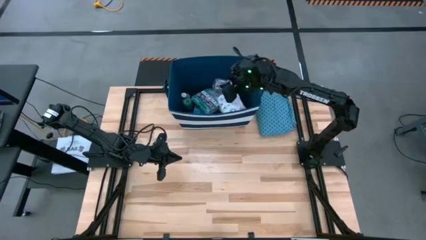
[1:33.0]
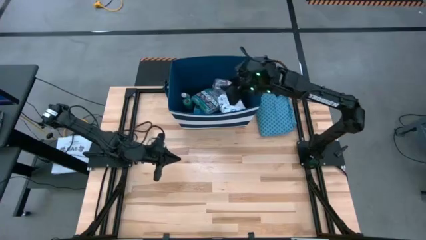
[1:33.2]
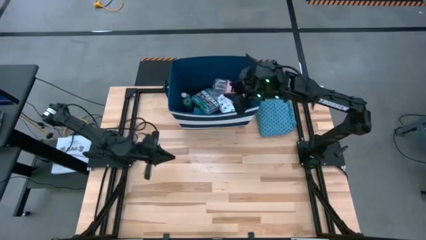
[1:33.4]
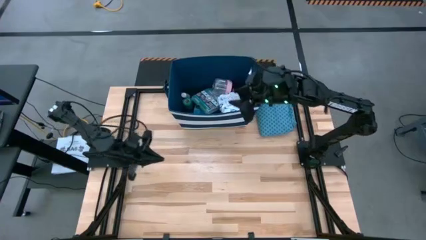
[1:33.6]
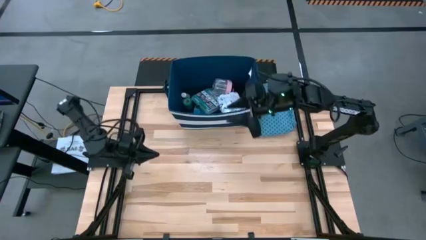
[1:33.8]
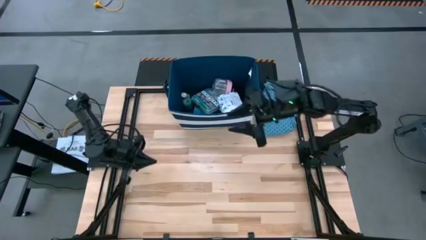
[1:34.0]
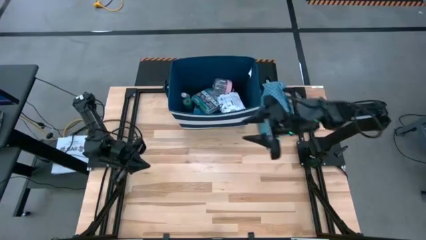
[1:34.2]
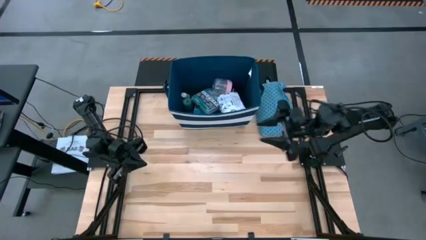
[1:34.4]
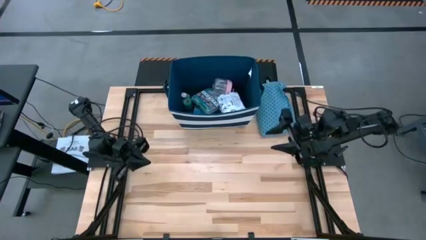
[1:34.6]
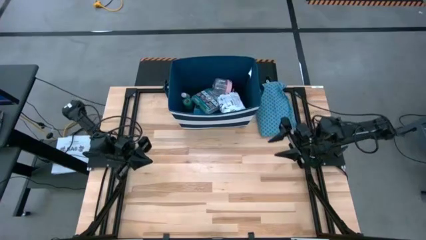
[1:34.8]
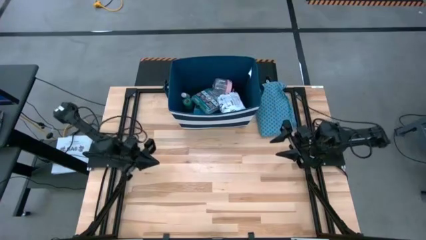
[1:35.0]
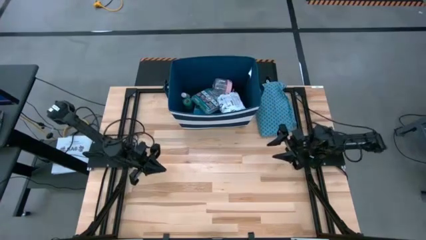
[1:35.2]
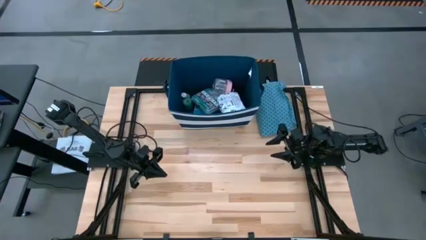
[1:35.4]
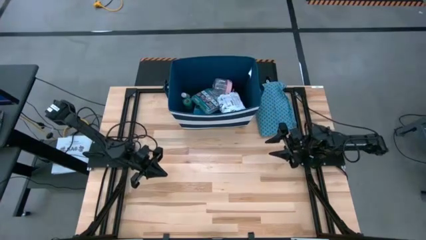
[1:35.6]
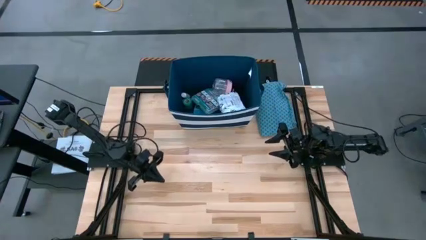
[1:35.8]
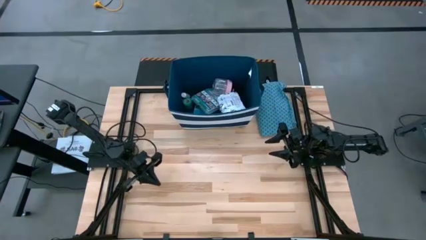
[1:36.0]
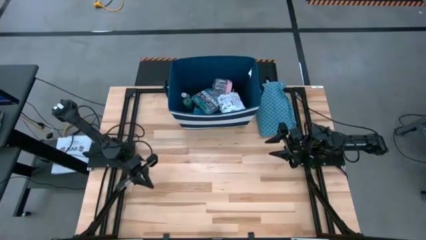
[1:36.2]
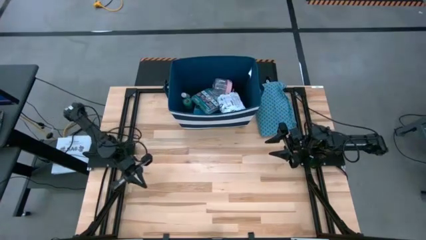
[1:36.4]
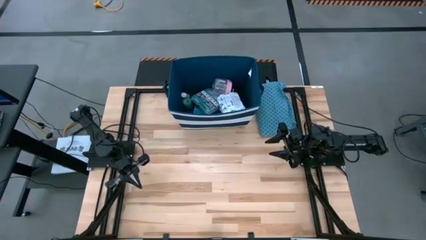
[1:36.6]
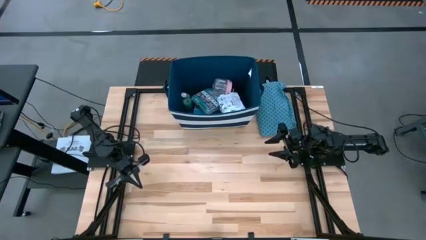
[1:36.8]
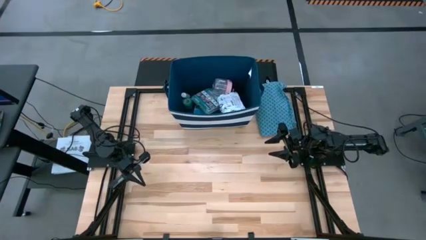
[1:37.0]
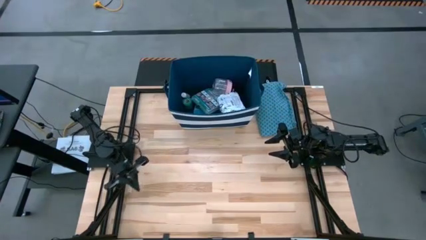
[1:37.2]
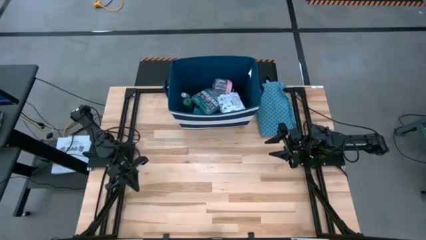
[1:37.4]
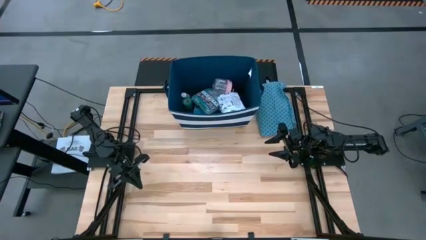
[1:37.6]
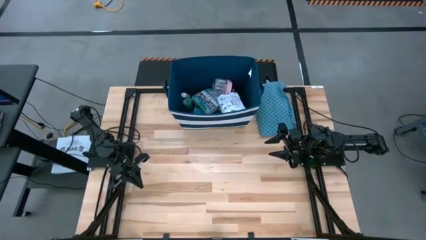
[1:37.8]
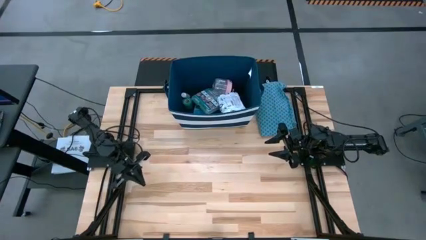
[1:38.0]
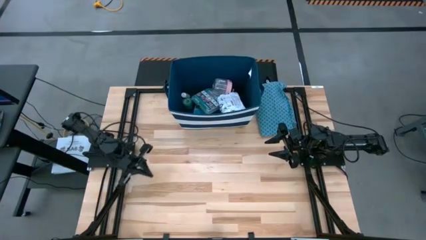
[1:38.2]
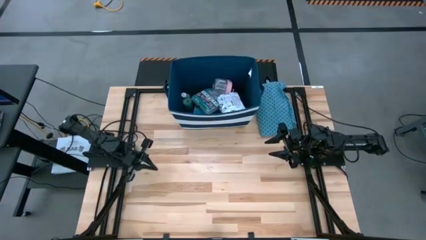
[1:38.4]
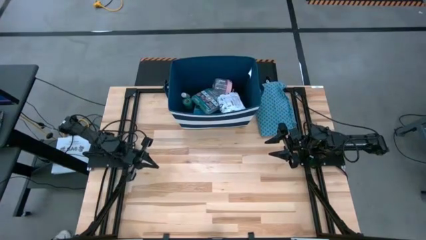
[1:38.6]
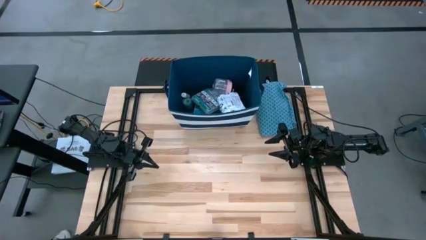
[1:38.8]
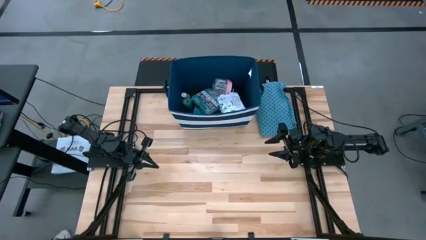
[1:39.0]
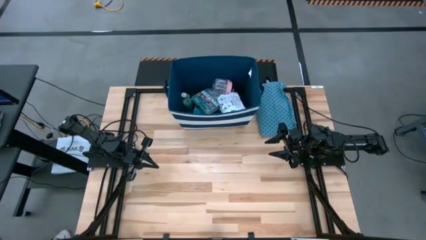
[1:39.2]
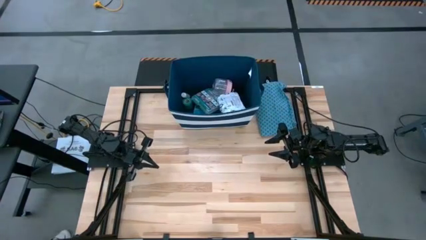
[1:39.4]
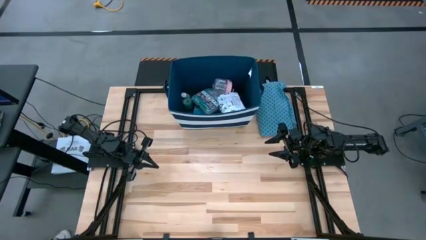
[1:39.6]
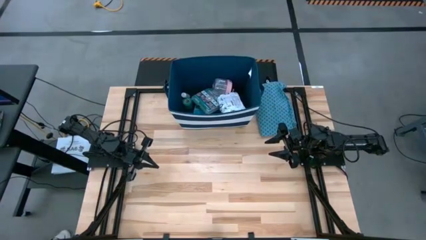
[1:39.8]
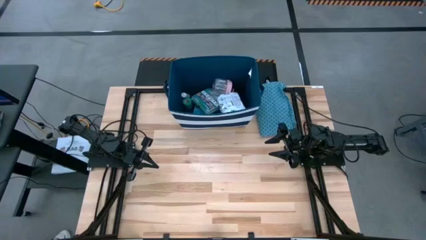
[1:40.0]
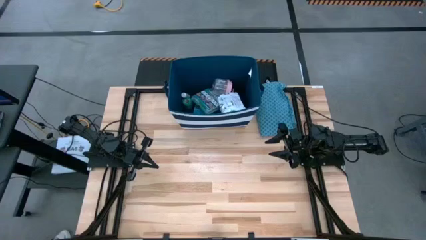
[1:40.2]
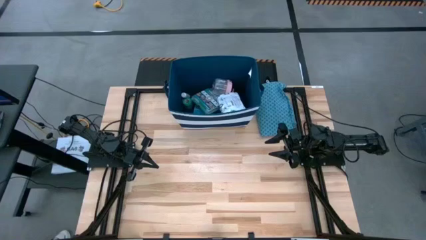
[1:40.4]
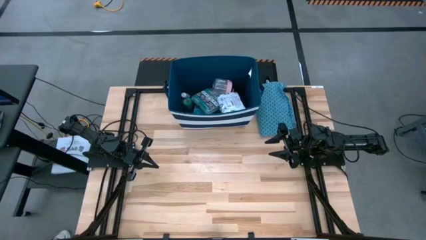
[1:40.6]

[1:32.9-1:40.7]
Task: Pick & place medical supplies in basket/bin
Return to Home Position

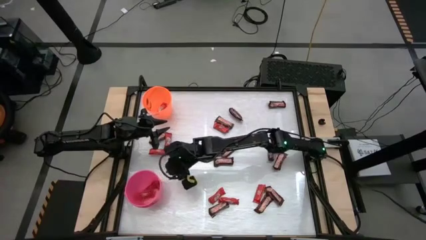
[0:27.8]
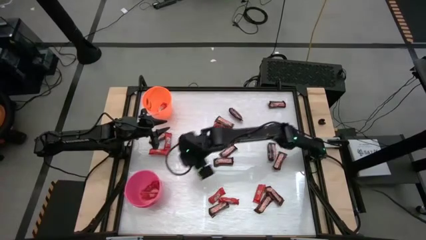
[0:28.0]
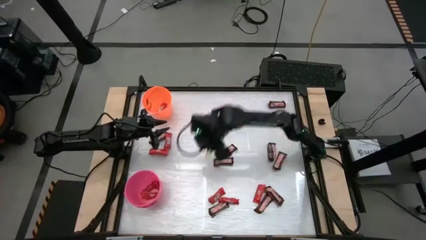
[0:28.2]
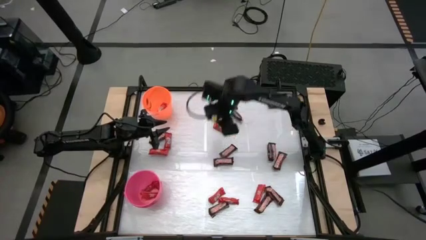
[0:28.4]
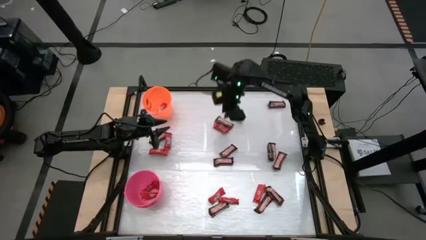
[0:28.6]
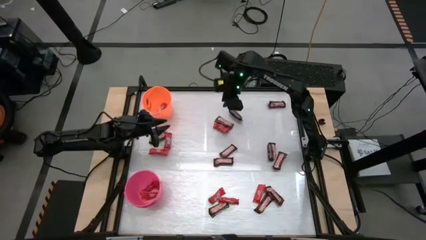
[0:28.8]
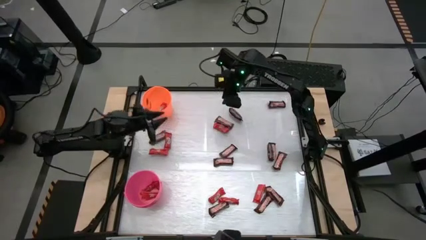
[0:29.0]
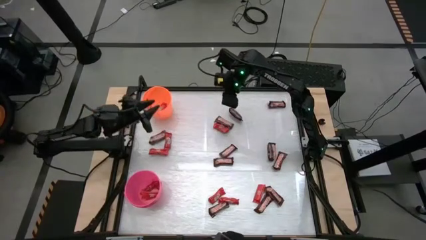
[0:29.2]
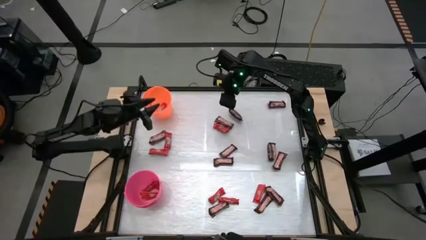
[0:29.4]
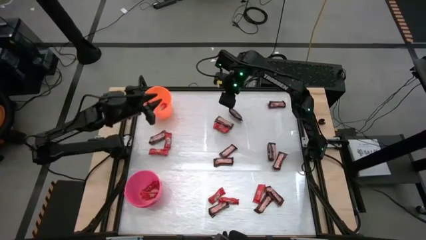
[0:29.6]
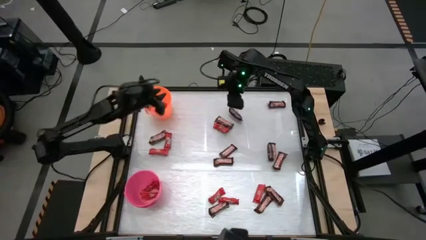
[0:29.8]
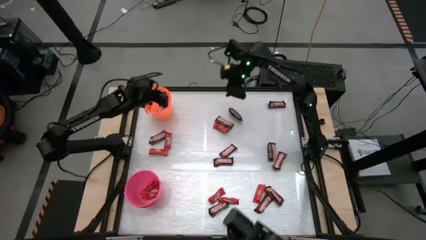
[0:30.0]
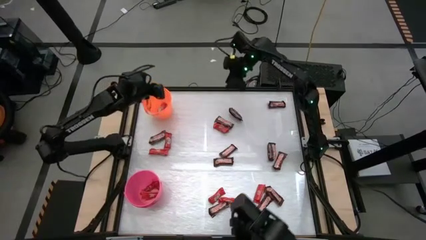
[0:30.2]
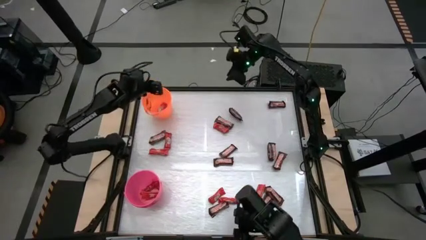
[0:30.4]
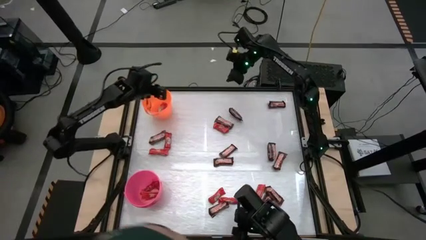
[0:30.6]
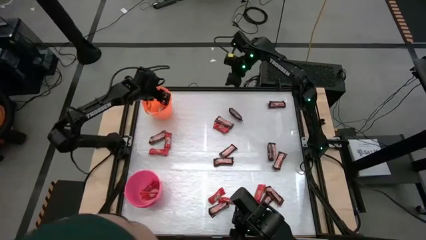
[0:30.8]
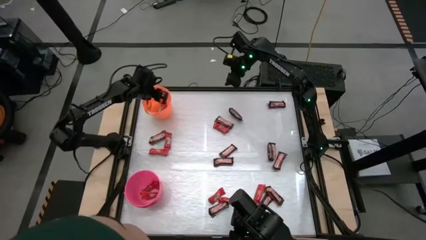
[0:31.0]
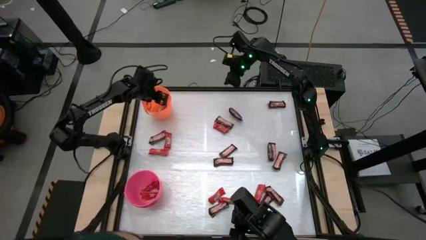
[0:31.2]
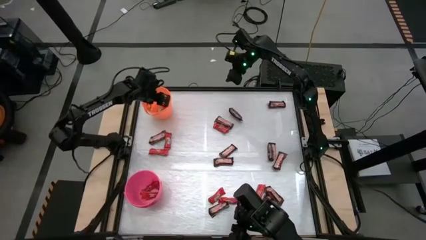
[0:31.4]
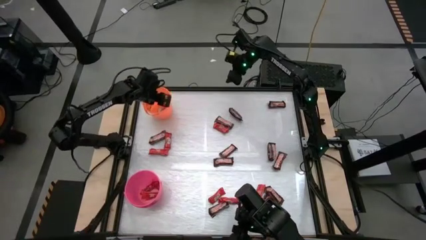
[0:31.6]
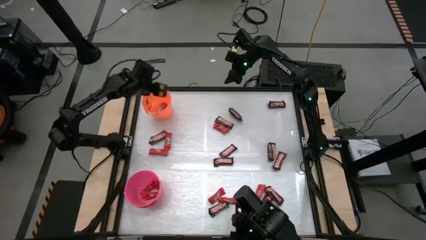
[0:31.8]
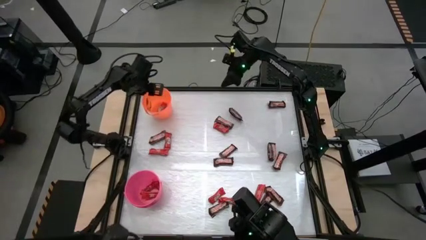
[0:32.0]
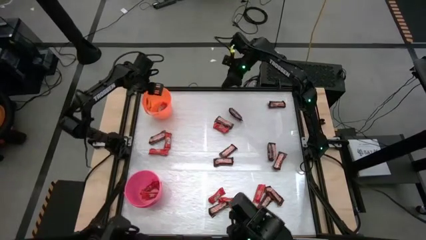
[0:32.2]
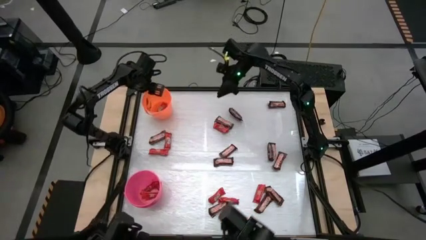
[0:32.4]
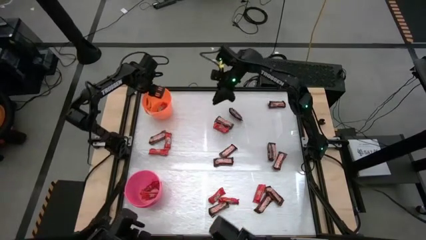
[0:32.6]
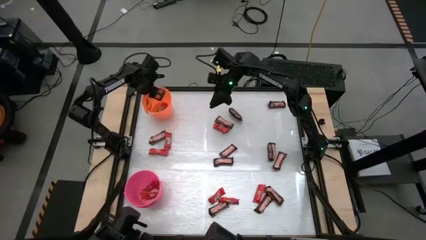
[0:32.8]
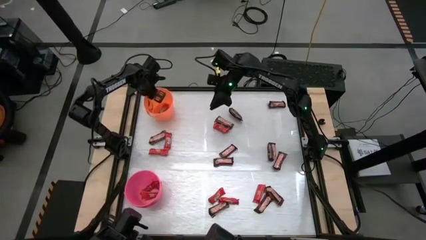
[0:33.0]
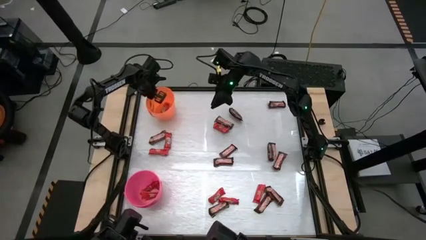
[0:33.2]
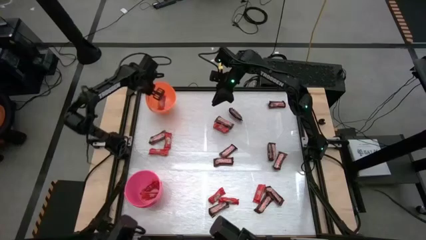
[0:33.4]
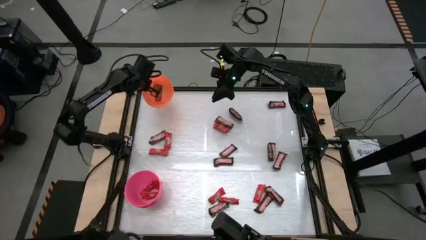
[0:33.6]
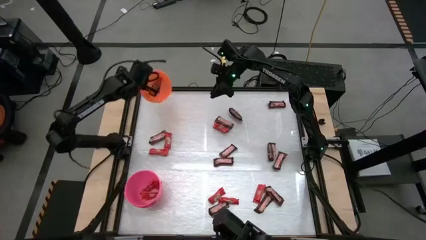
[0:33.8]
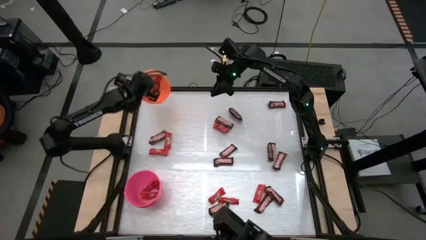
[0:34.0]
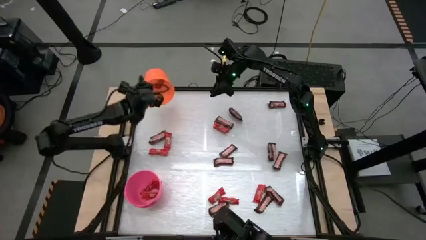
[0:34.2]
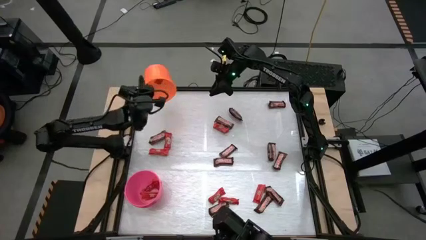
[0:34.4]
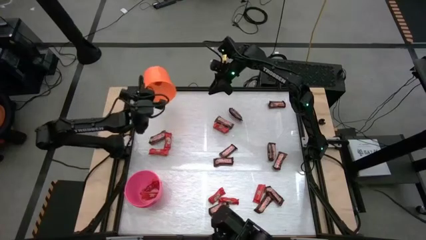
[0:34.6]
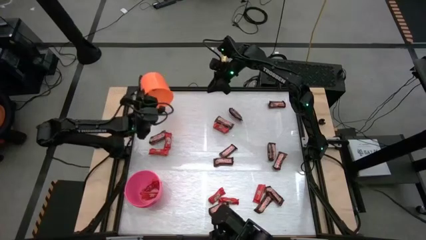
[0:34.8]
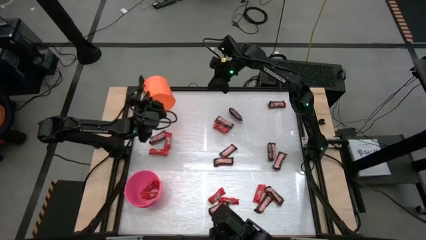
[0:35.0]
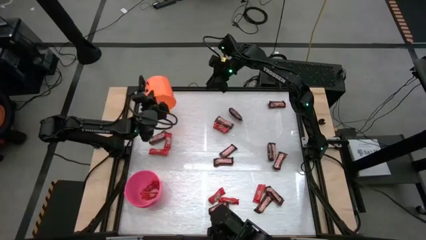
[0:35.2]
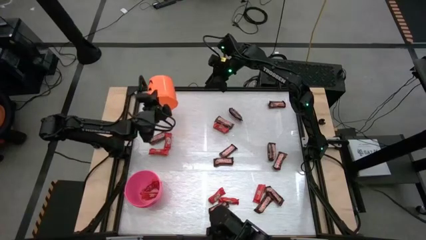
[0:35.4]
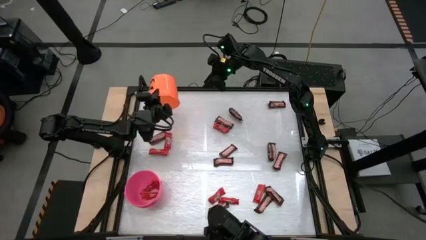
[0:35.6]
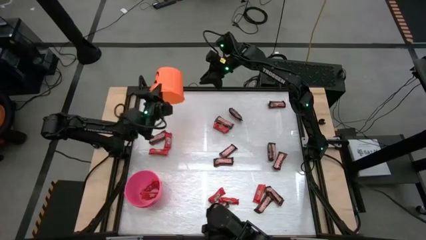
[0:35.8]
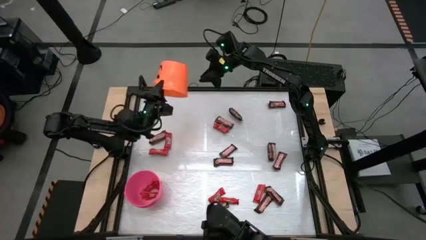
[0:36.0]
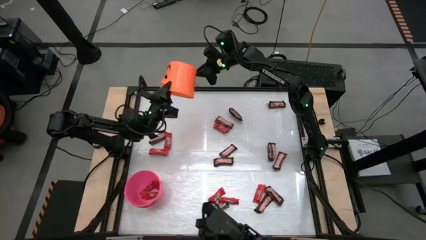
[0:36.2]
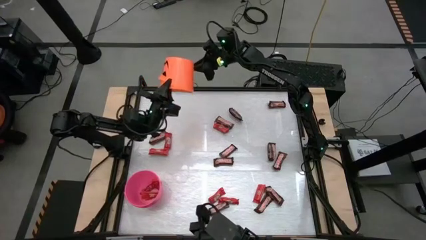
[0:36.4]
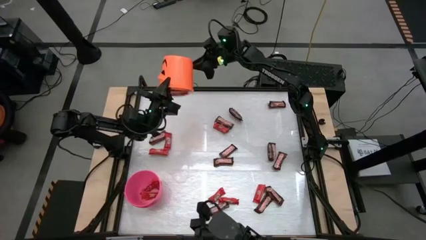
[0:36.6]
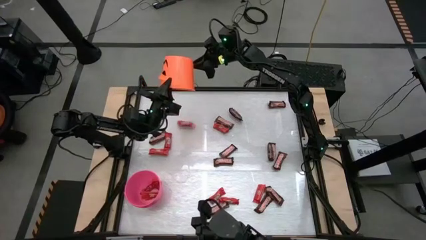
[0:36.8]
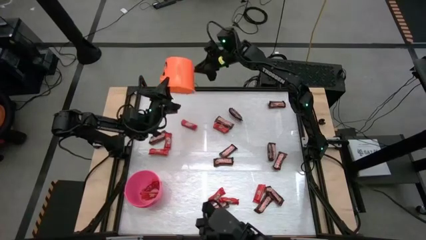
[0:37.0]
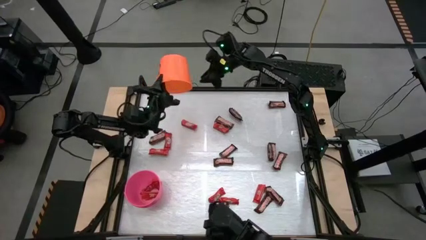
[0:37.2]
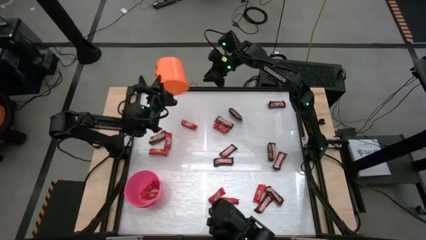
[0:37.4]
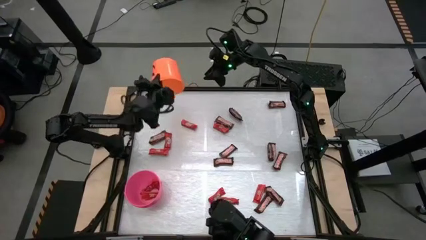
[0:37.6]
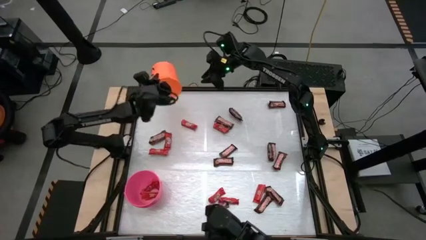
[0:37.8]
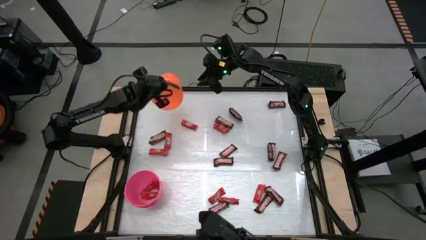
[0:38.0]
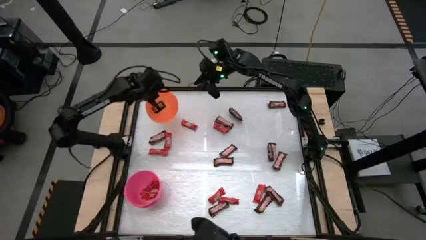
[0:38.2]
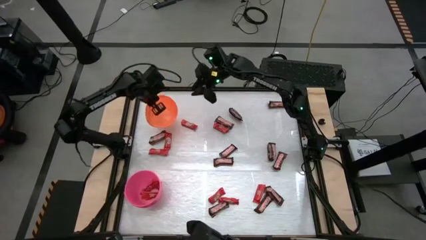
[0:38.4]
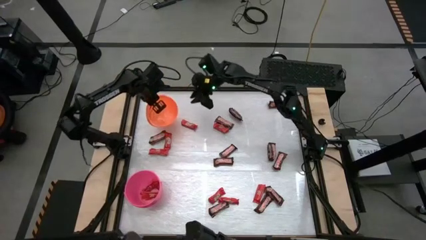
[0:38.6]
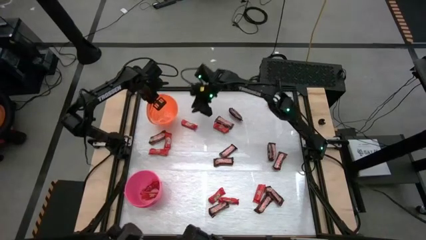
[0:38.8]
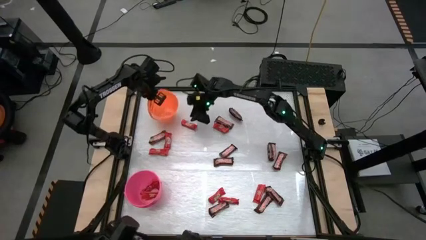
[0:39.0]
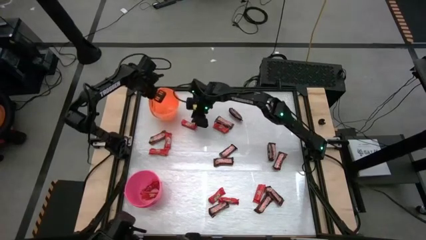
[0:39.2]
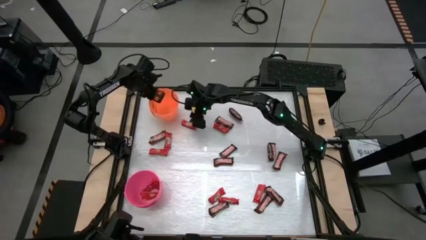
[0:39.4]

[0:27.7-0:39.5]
Task: Sort candy by brand, put in halloween buckets
Pour the orange bucket
